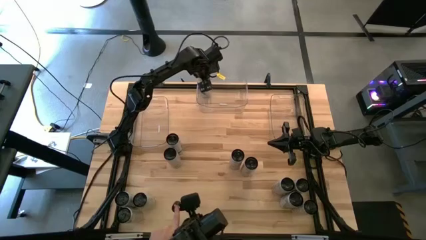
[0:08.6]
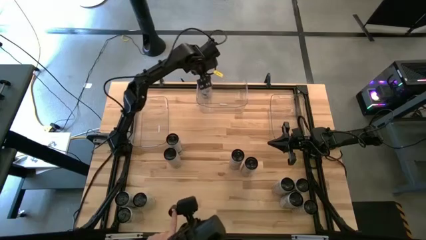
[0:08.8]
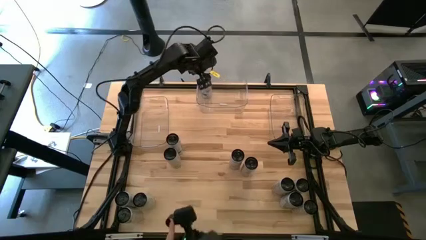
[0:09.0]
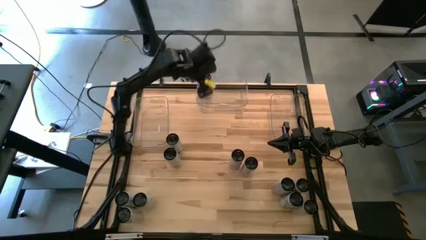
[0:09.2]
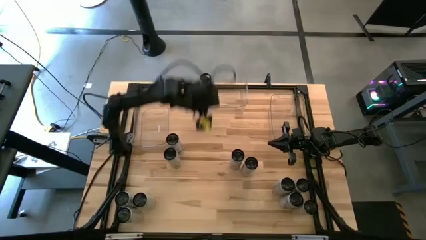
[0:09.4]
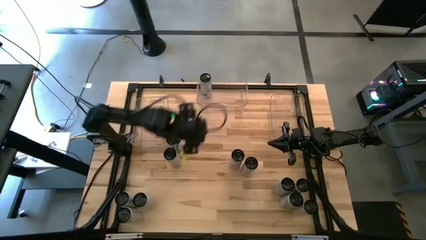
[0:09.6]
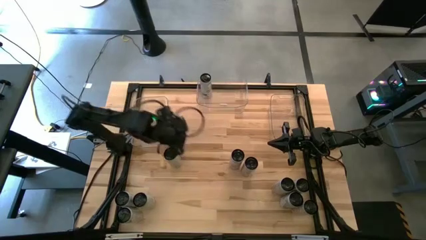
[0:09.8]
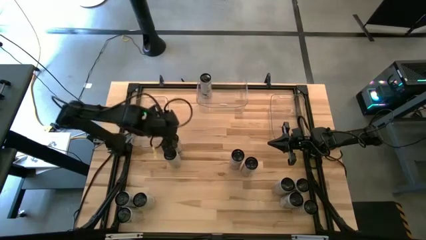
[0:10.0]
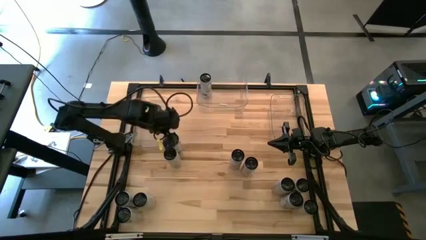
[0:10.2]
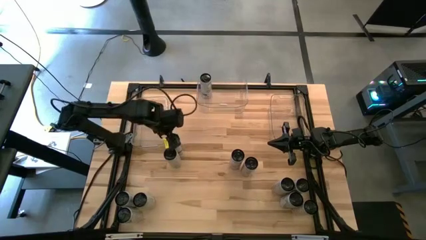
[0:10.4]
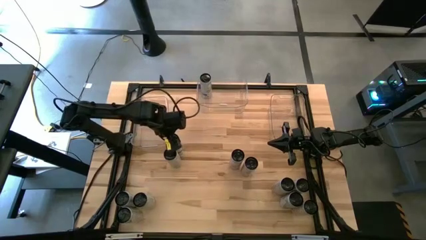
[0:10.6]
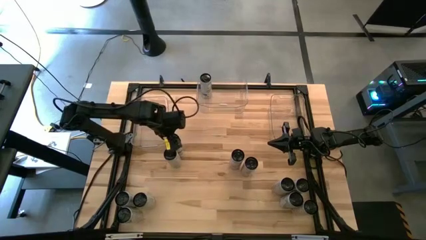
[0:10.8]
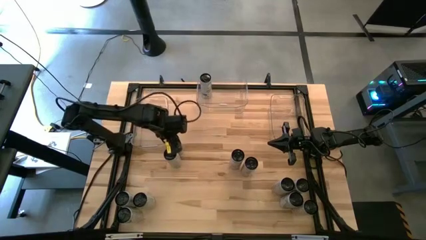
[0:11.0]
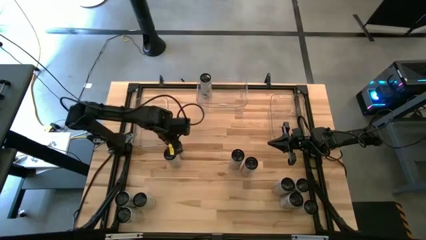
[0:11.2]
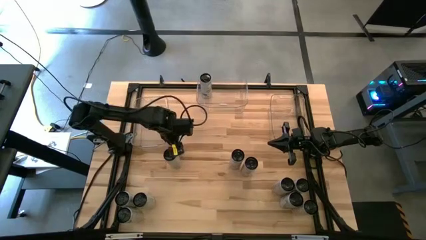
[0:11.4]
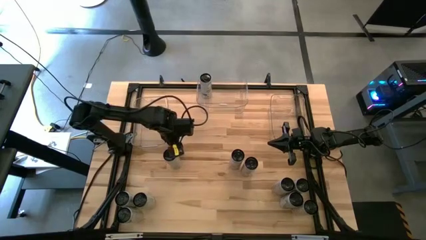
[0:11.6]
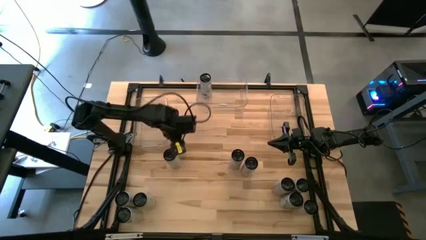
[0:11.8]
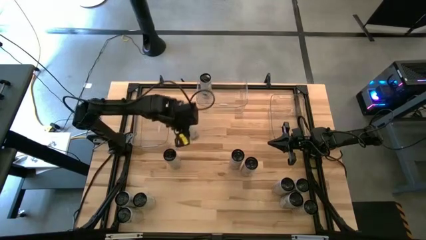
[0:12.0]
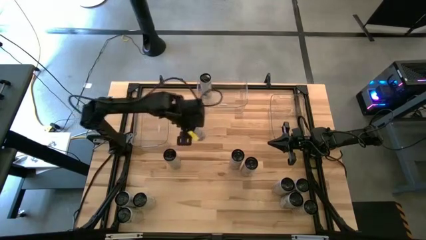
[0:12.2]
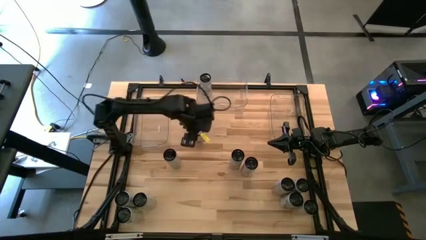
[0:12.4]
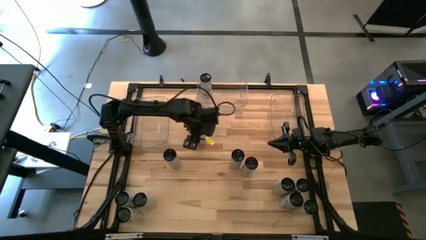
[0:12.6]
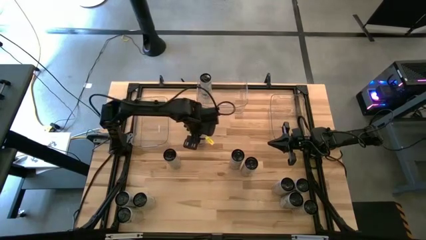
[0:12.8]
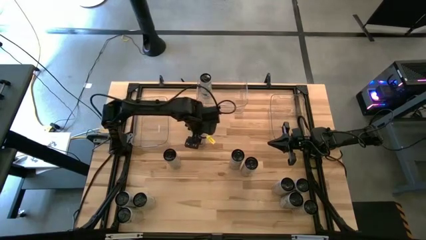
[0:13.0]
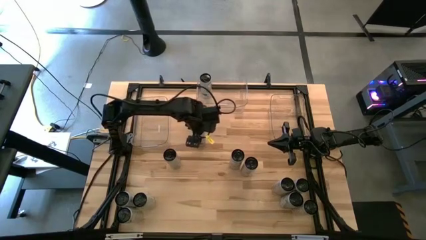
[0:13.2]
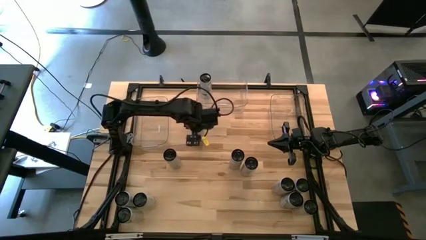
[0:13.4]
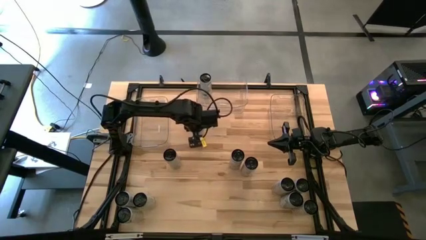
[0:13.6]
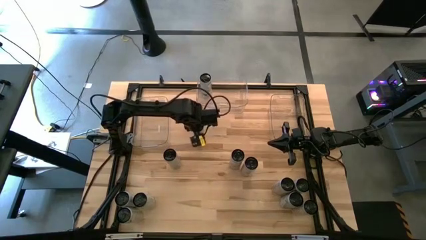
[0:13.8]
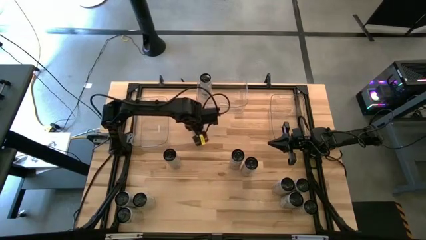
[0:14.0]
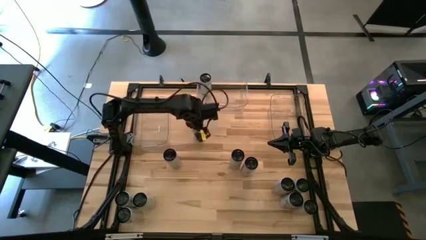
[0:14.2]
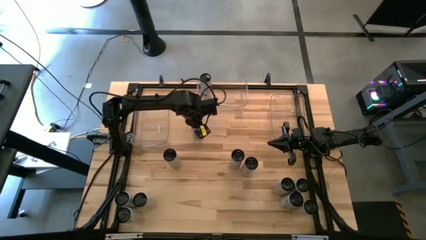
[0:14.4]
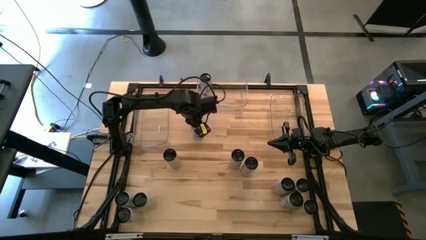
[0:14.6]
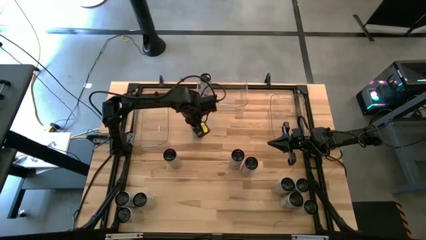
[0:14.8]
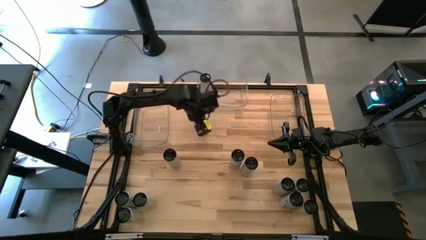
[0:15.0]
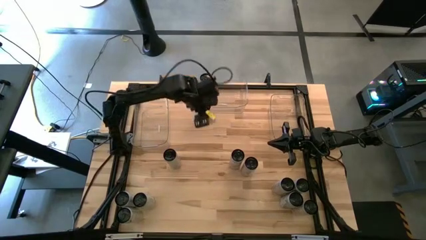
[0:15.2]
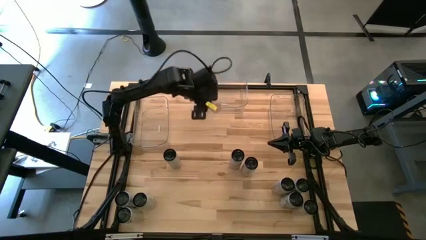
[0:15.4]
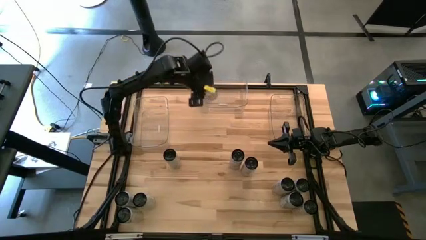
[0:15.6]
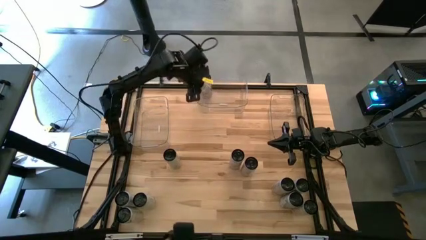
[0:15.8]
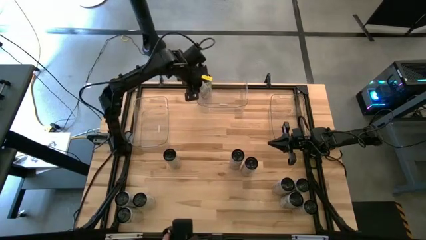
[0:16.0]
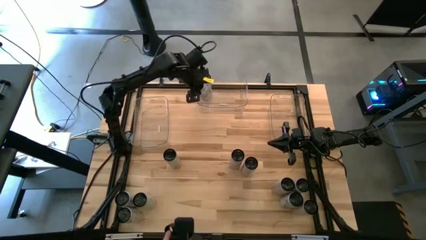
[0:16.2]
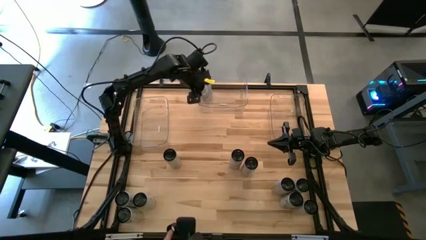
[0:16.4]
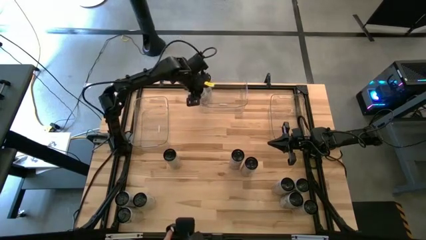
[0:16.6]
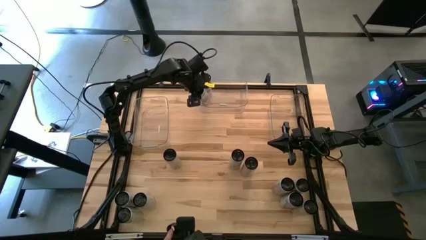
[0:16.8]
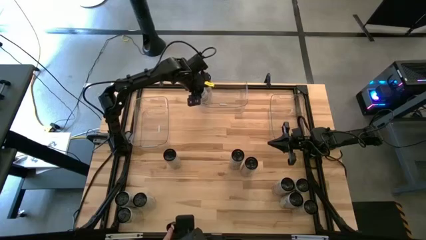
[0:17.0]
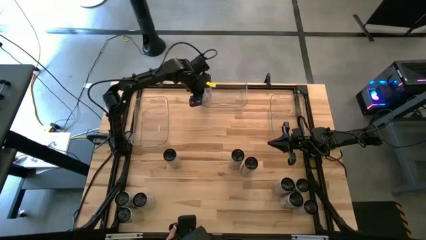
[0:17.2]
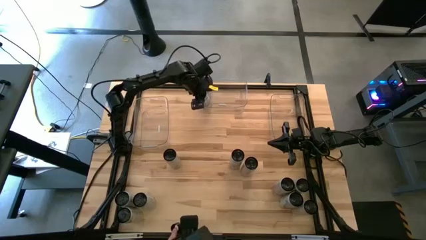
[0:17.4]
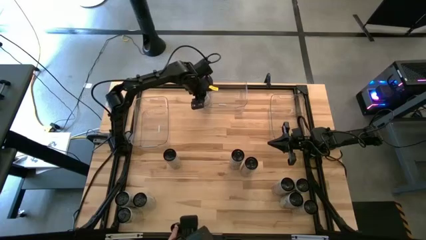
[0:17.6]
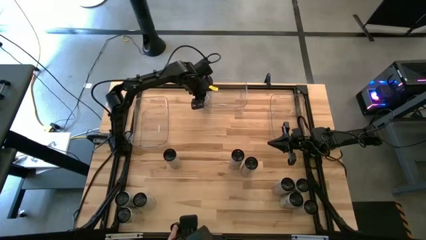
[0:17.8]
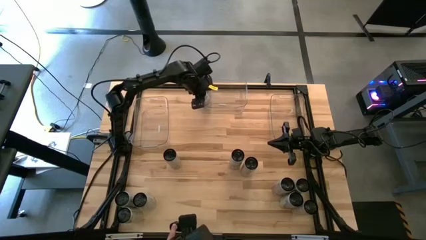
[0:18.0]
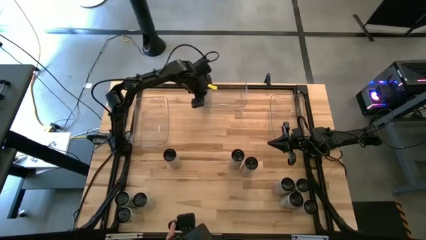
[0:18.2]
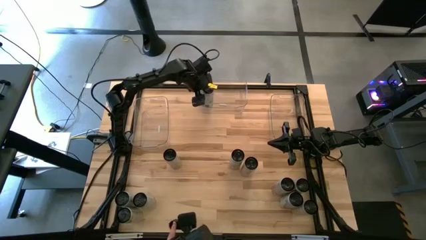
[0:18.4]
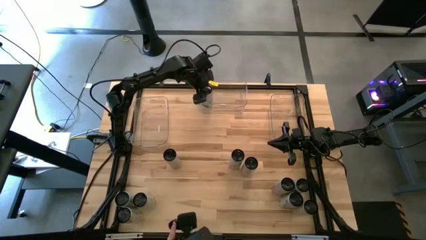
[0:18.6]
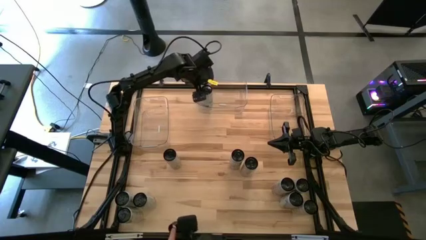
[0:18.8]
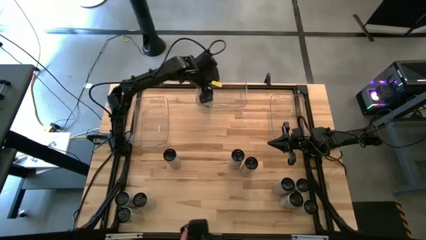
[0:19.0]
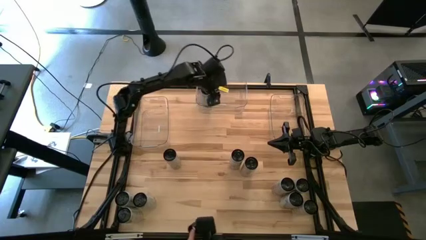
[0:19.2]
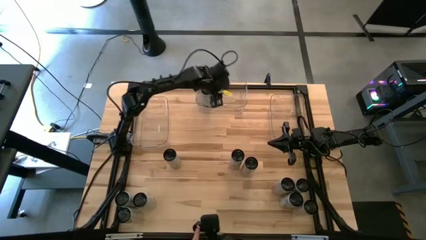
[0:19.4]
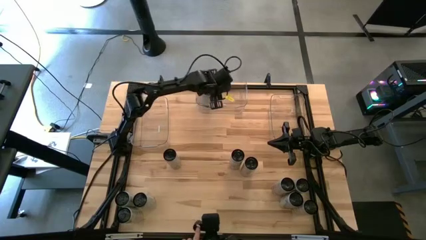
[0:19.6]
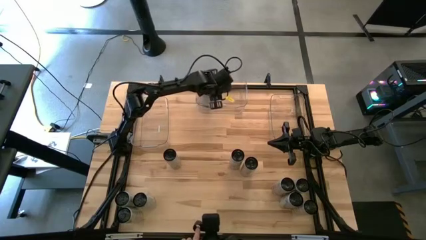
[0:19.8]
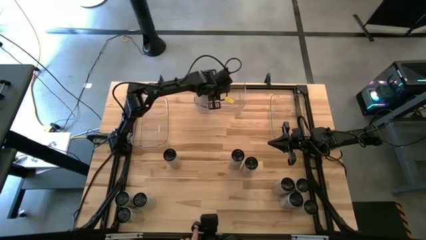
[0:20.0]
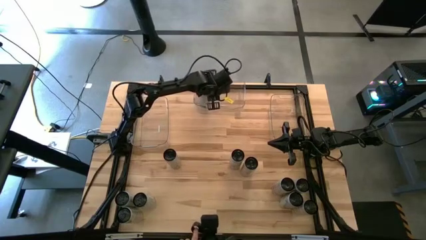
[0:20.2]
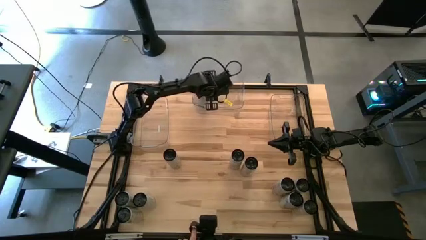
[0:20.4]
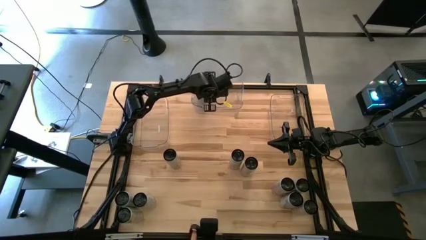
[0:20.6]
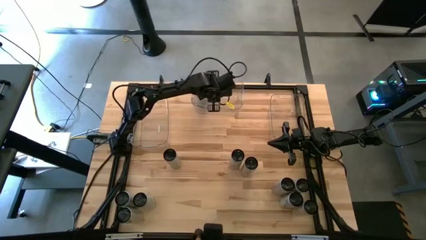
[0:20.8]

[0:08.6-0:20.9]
Task: Sort soda cans
Put the white and blue soda can into the middle transparent bin
